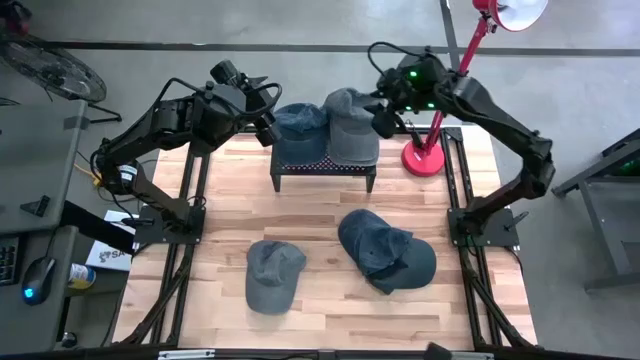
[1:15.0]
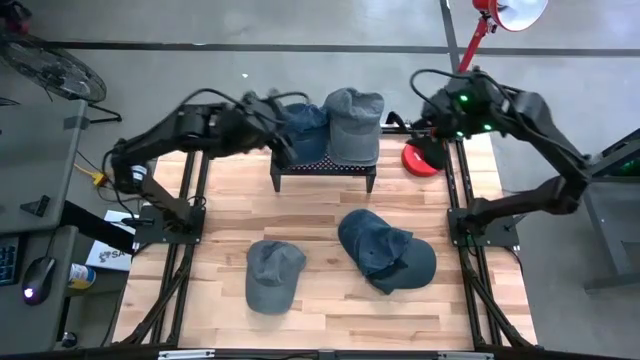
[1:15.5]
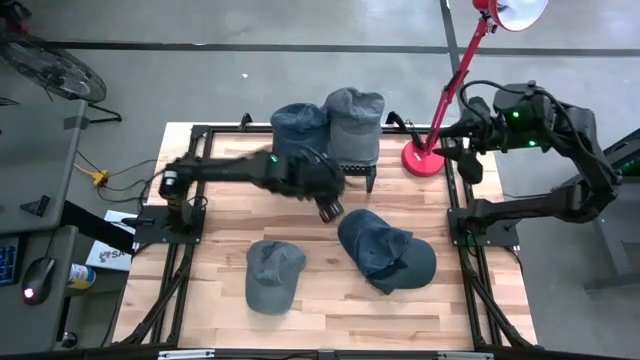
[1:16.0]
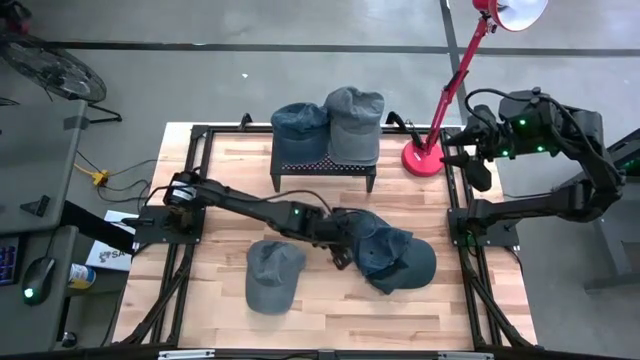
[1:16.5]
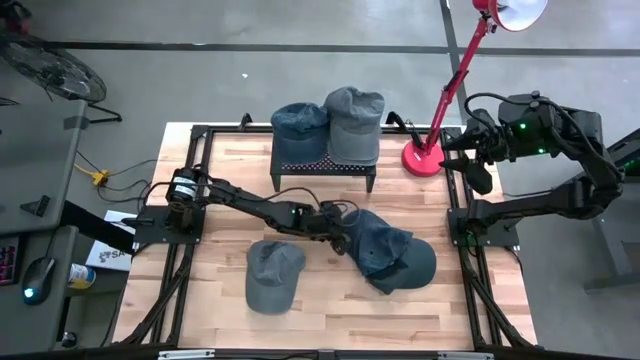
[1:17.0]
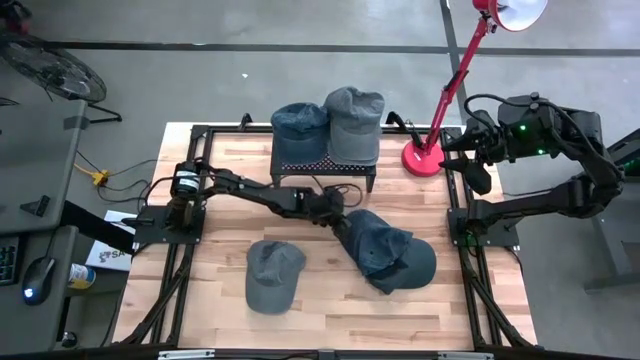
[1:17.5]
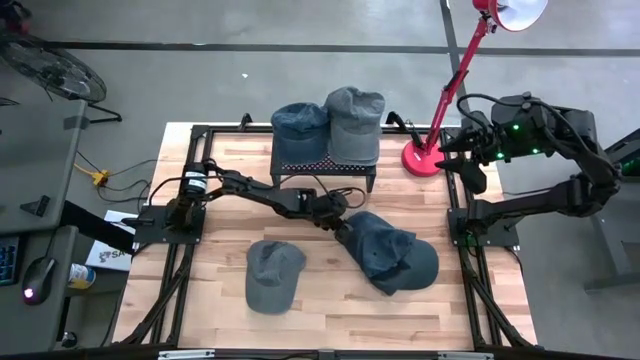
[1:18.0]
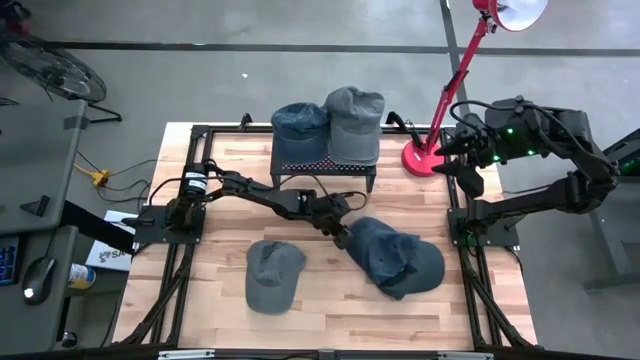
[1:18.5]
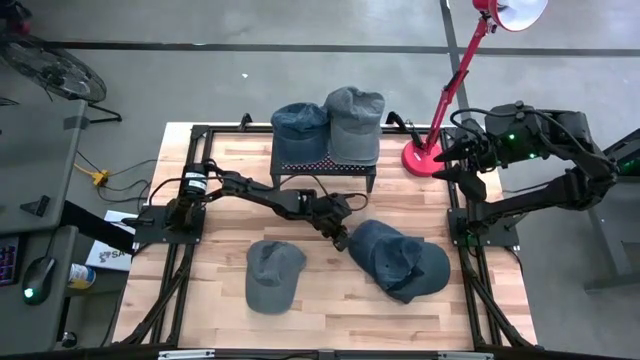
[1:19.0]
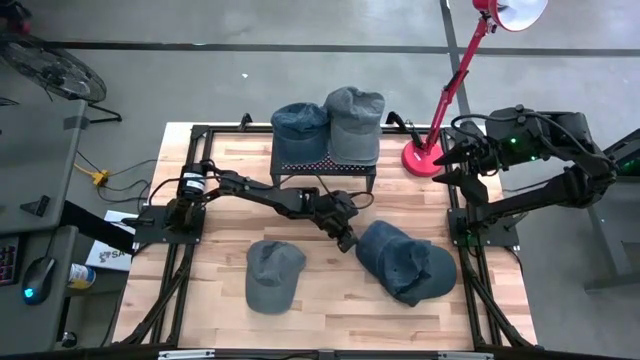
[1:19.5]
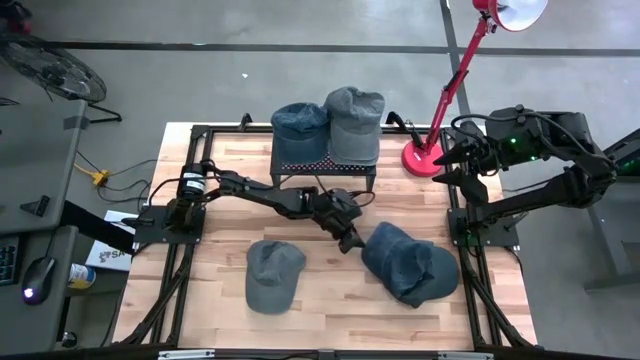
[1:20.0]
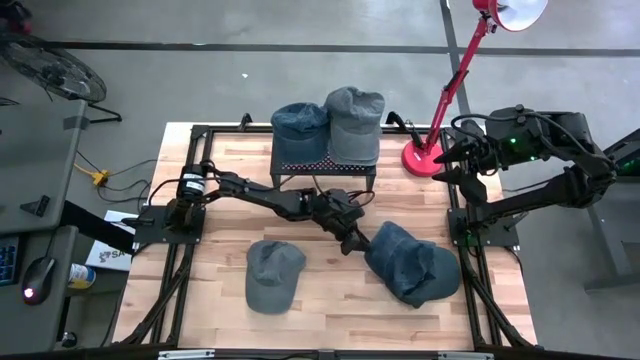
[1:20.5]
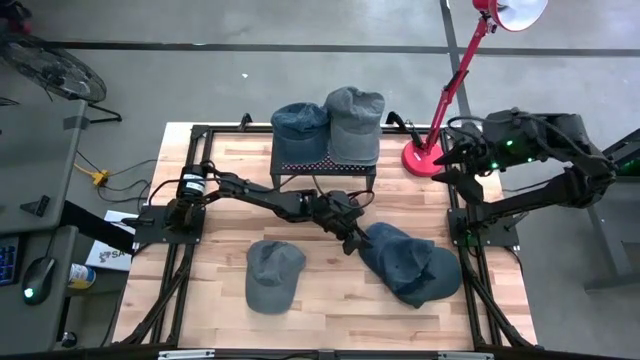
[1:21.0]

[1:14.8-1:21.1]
Task: Pick & Place hat
Stack the top blue cap on the blue cap on the shelf

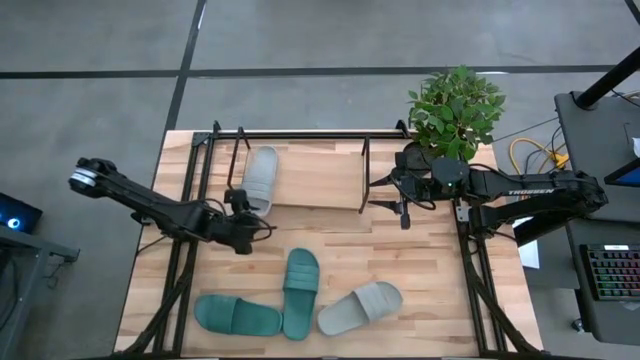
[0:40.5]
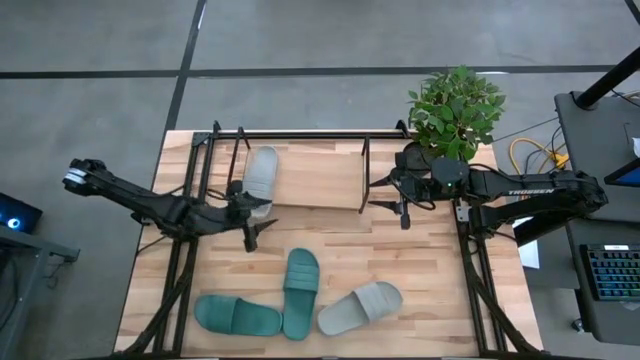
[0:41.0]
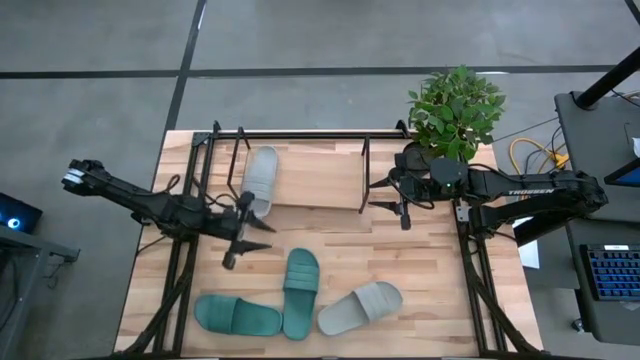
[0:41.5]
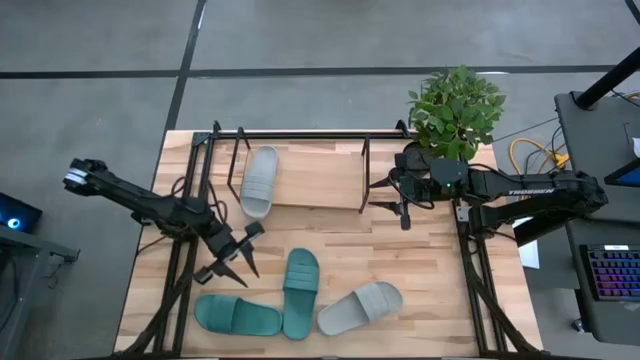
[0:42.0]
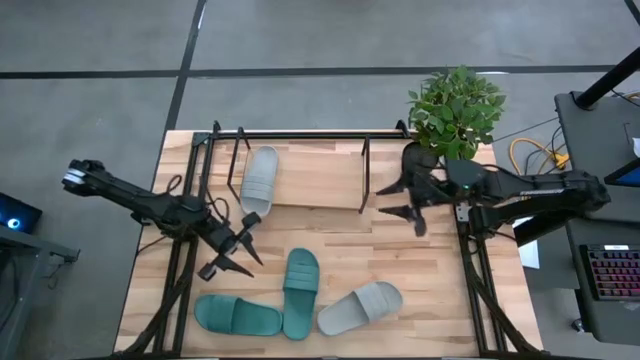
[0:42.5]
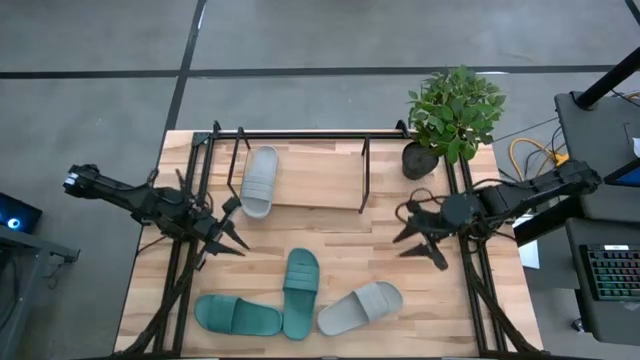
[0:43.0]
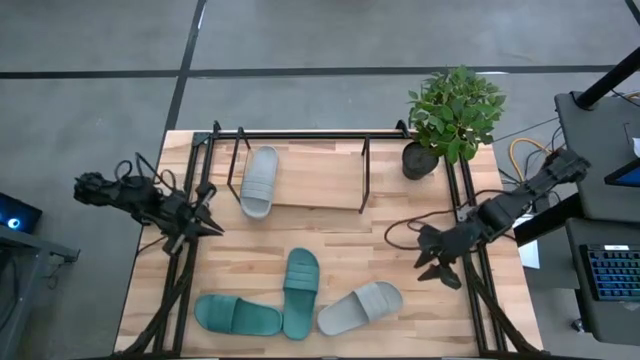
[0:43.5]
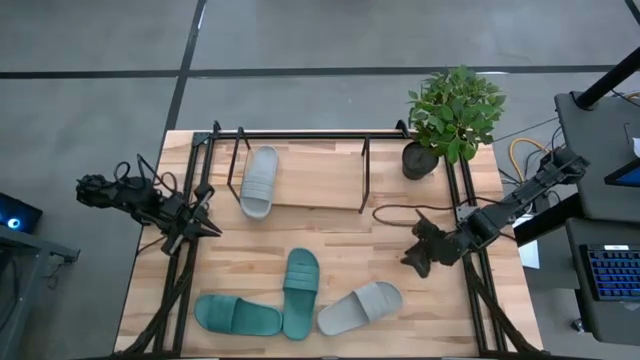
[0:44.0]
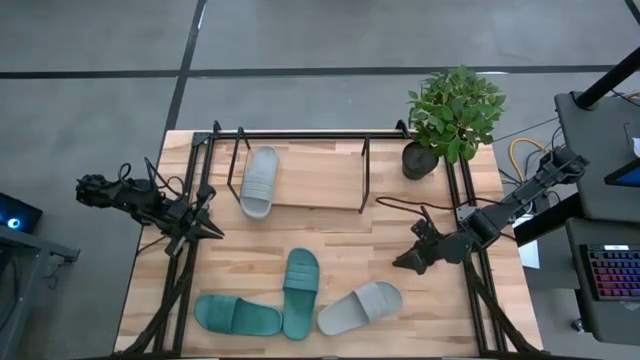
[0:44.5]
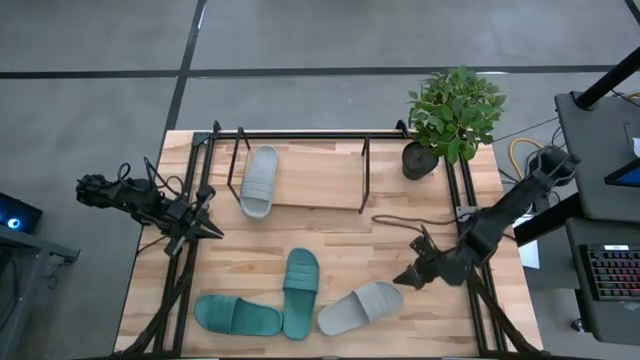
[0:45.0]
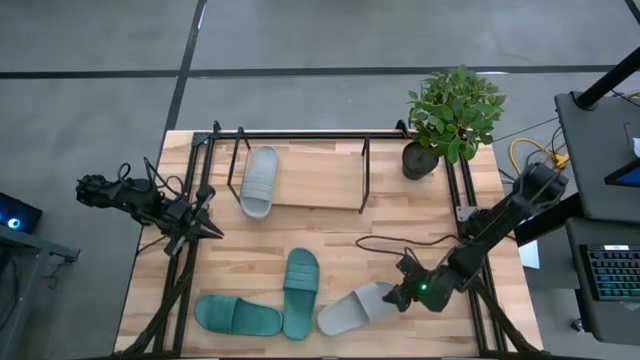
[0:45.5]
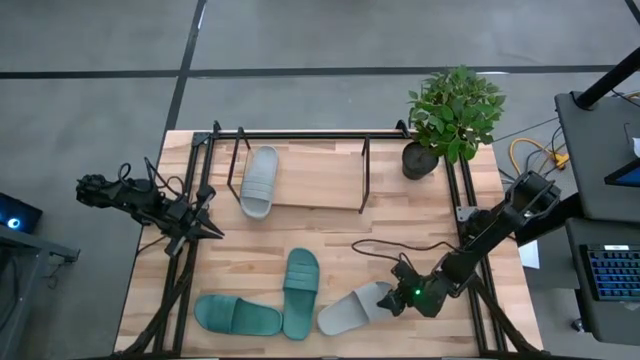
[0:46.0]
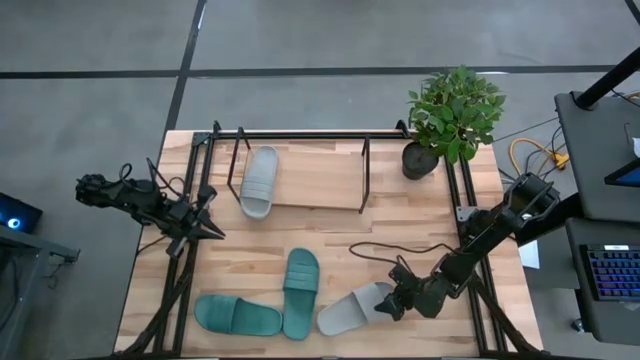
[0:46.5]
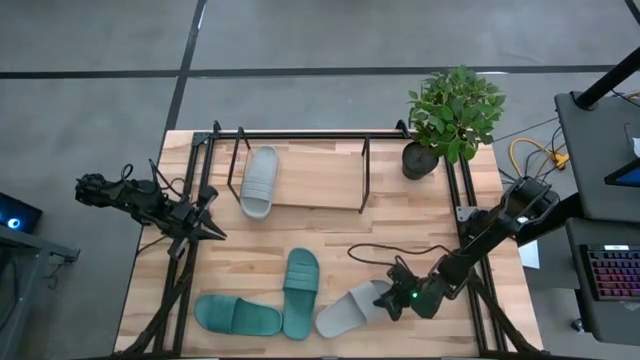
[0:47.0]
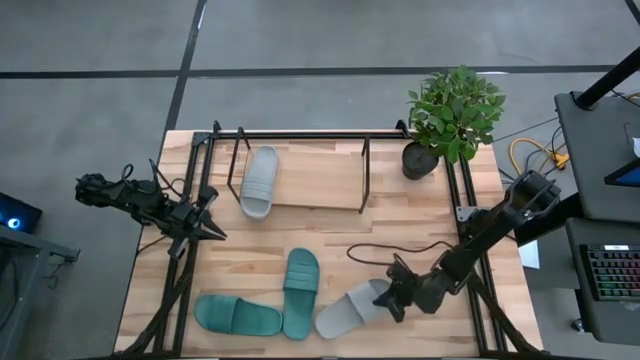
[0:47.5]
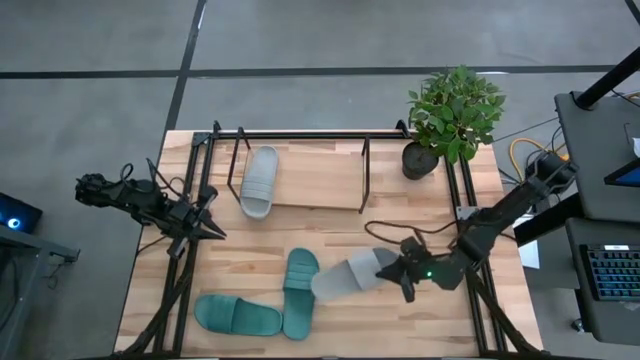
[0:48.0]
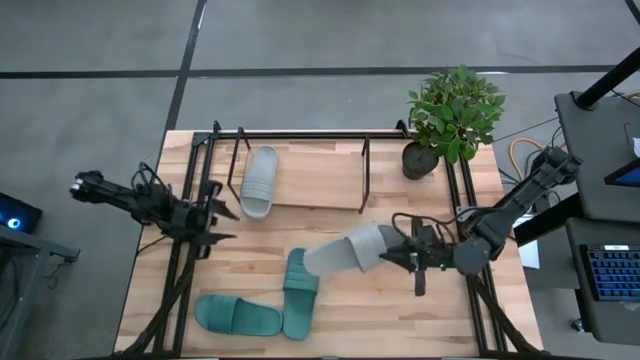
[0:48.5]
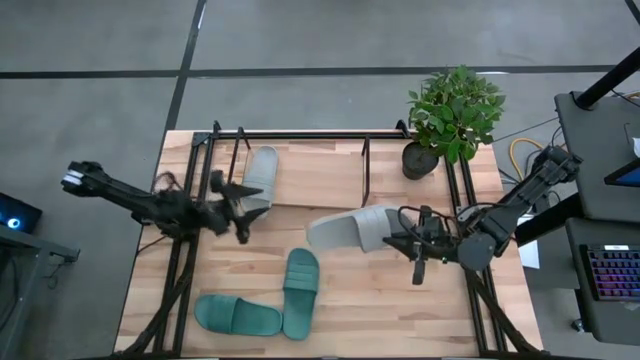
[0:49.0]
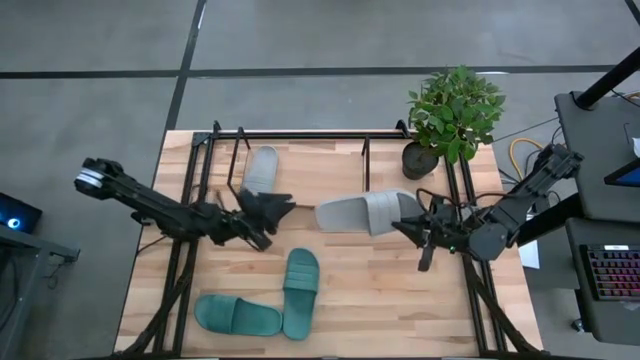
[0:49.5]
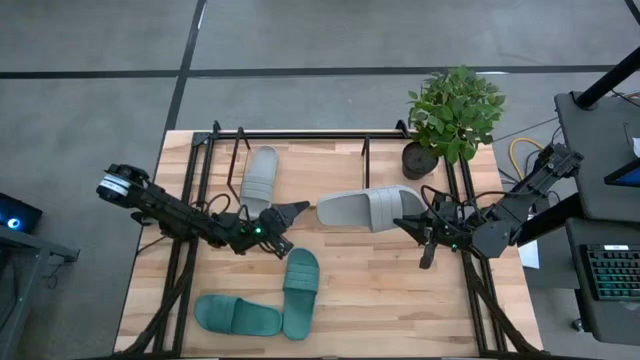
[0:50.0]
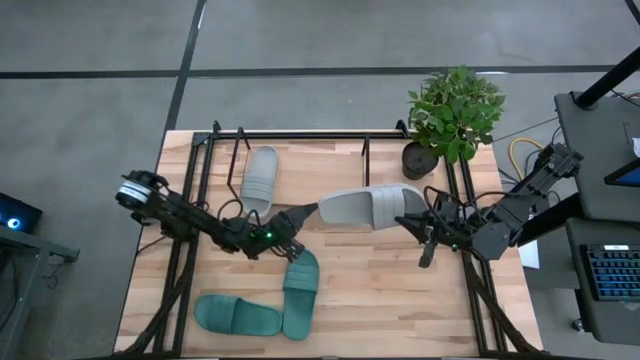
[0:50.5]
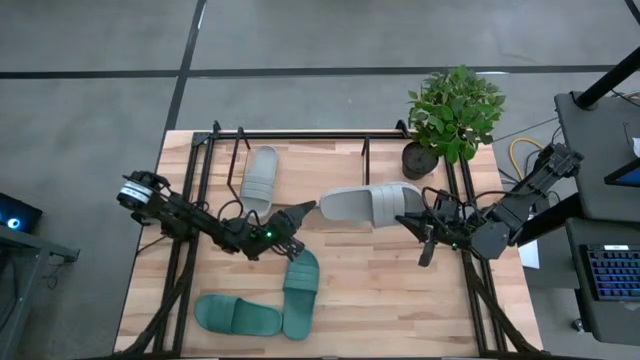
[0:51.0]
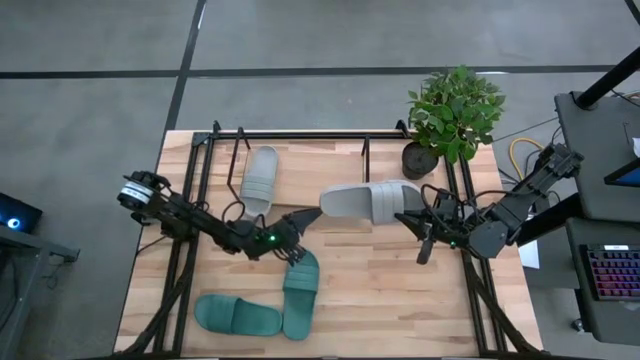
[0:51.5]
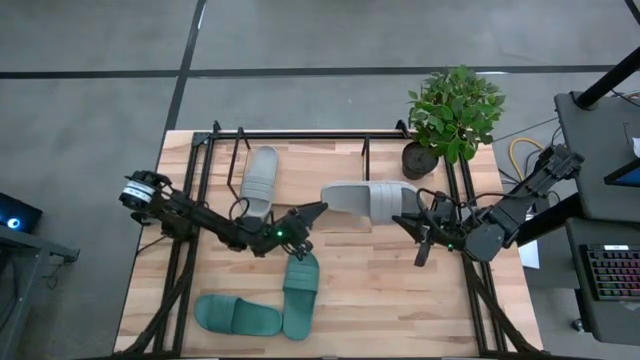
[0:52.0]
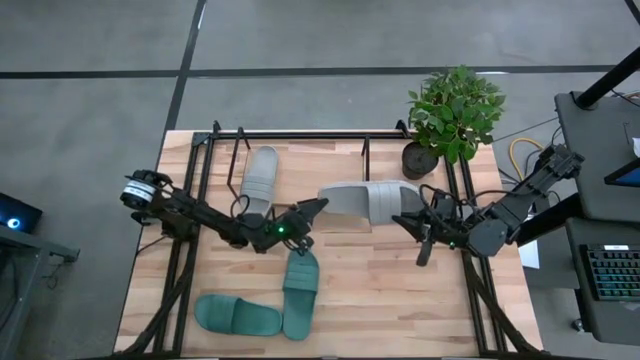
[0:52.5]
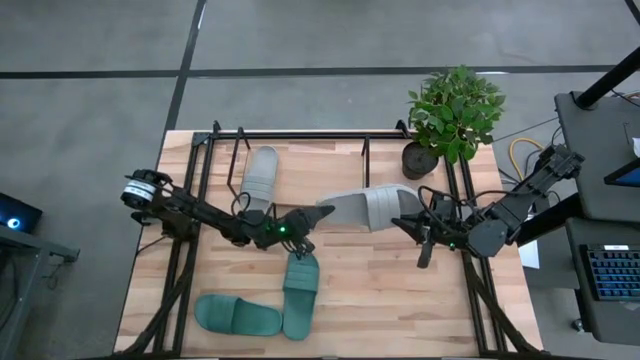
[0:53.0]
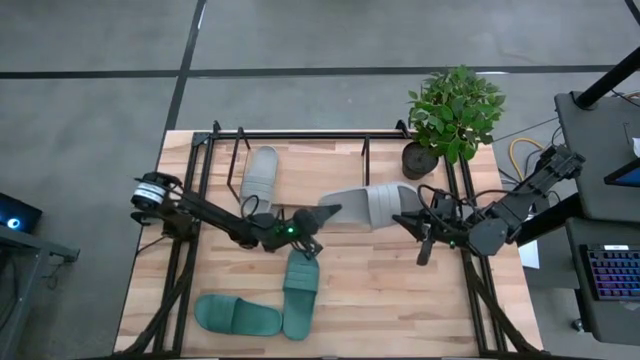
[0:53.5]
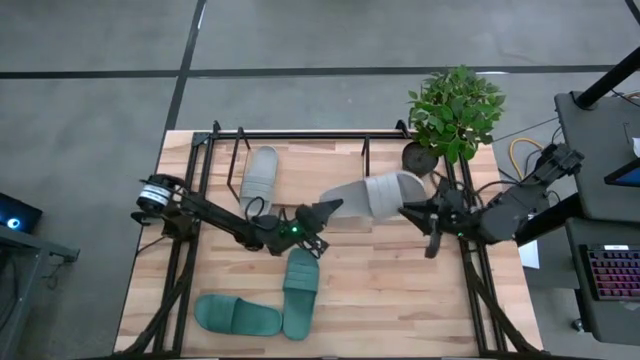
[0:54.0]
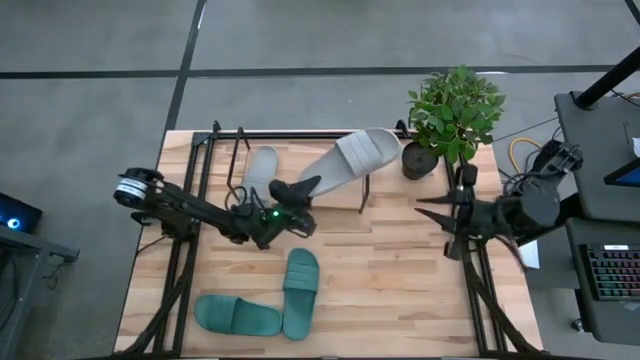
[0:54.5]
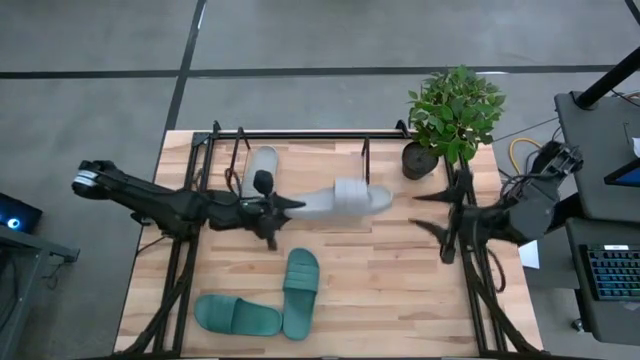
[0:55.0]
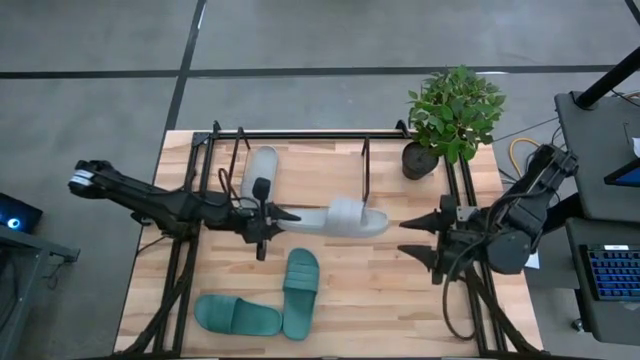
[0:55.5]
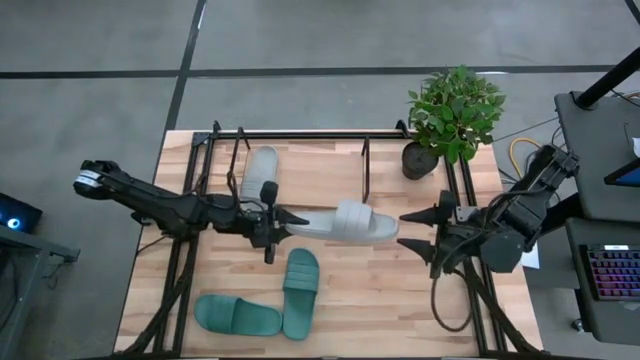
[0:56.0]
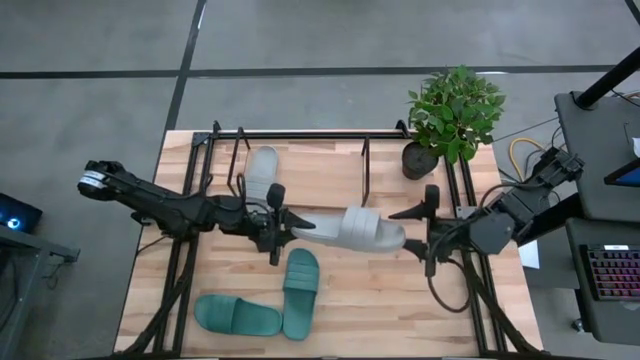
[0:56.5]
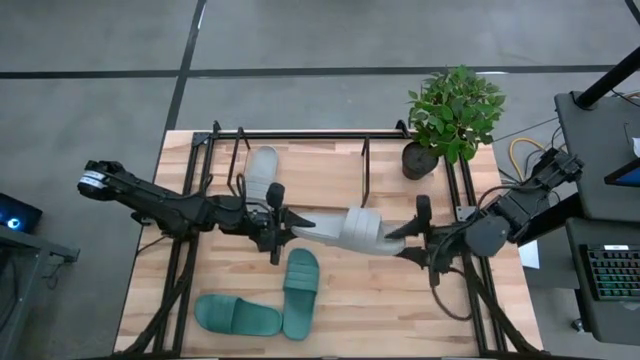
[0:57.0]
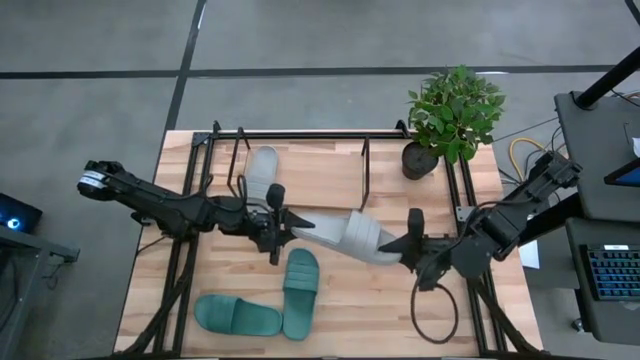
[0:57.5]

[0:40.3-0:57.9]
Task: Pick and place slides into the shelf
Put the left grey slide on the shelf
